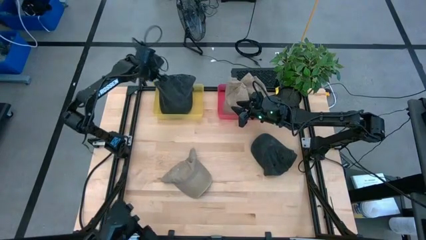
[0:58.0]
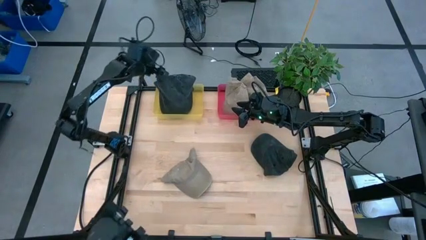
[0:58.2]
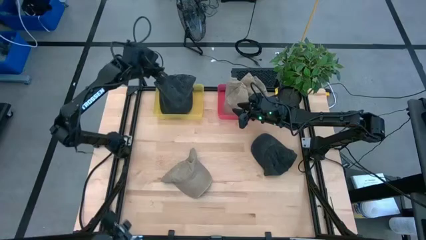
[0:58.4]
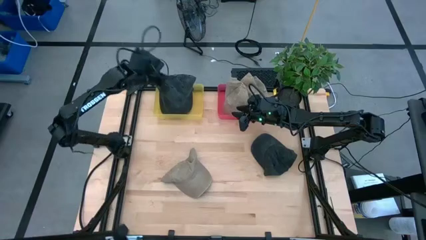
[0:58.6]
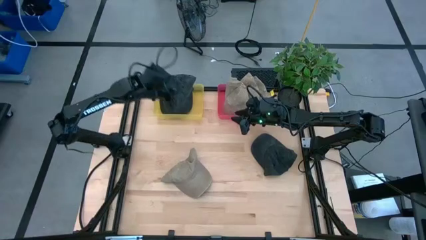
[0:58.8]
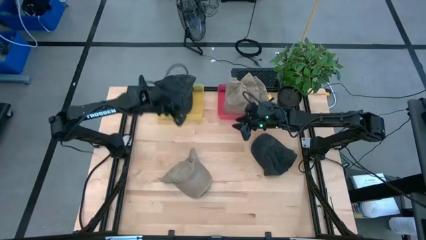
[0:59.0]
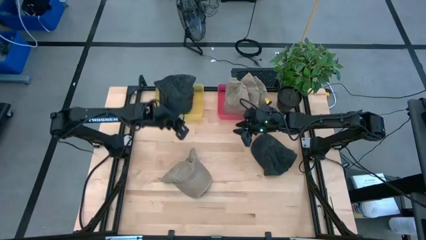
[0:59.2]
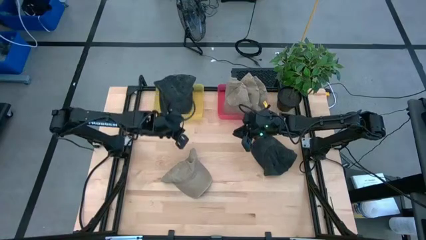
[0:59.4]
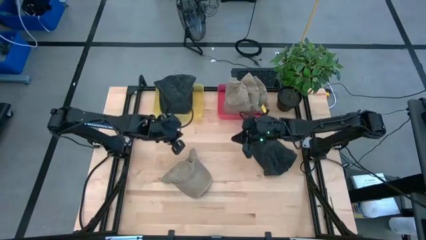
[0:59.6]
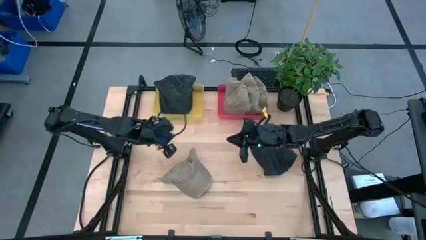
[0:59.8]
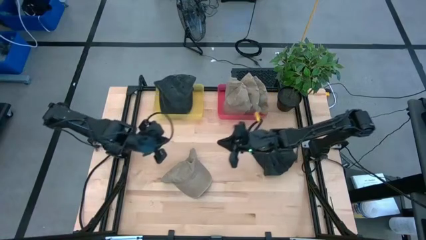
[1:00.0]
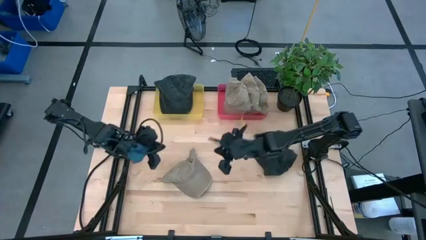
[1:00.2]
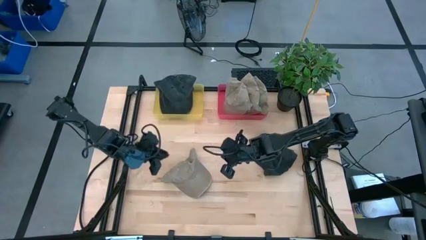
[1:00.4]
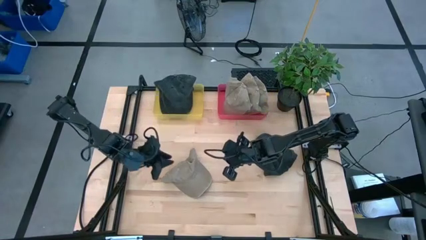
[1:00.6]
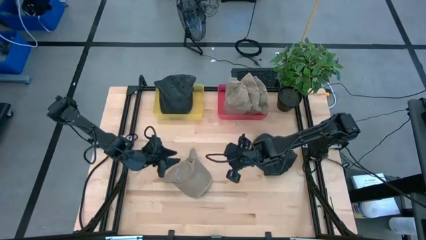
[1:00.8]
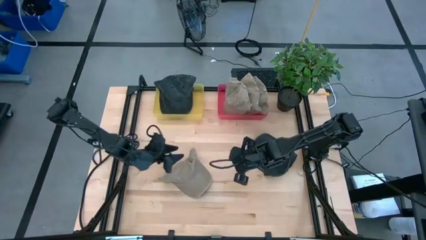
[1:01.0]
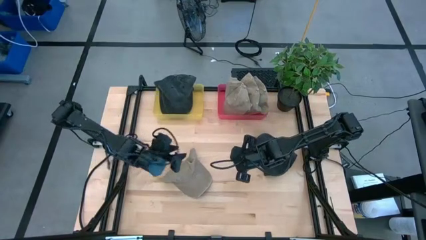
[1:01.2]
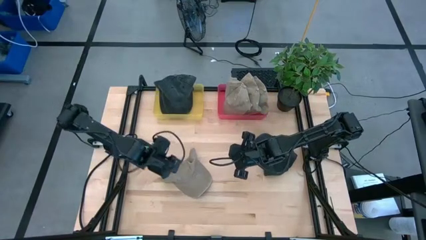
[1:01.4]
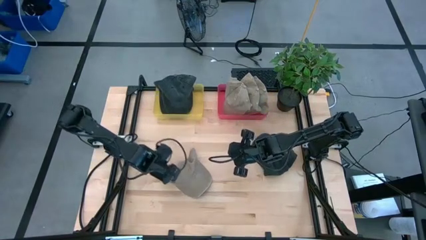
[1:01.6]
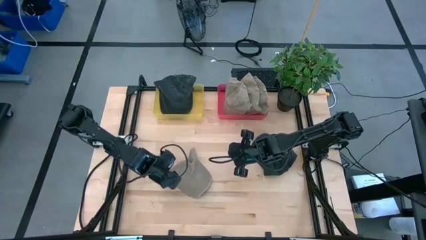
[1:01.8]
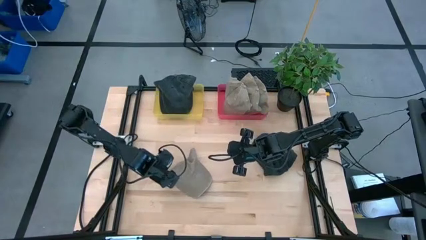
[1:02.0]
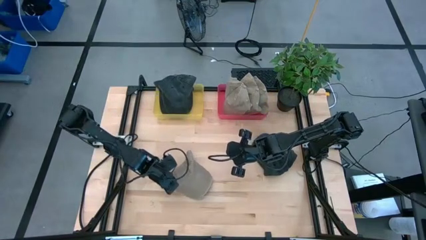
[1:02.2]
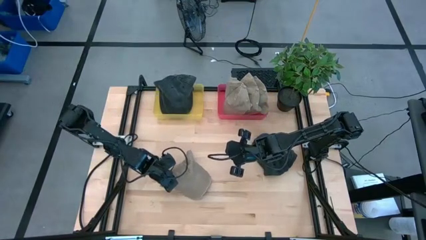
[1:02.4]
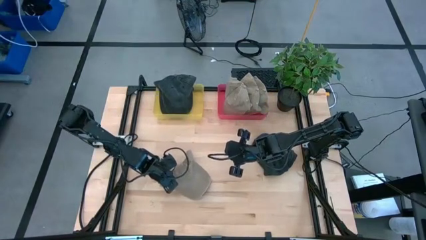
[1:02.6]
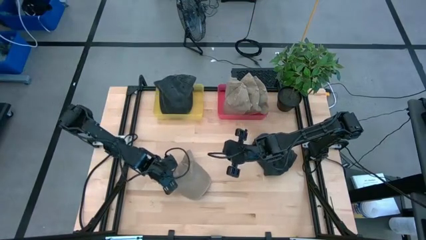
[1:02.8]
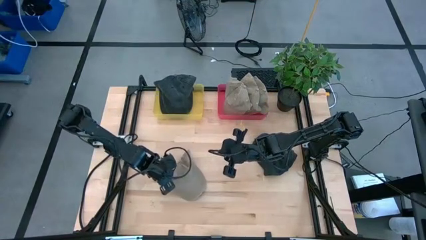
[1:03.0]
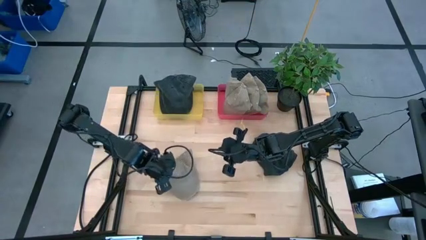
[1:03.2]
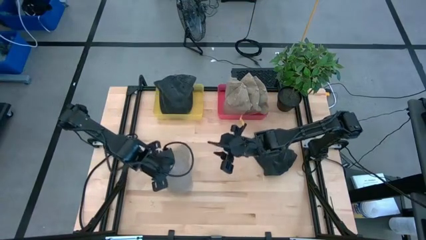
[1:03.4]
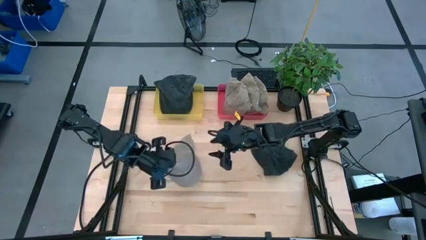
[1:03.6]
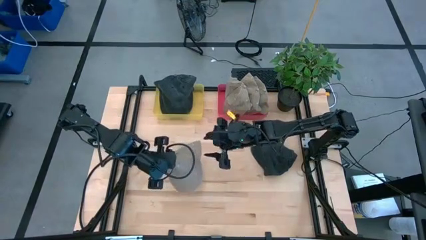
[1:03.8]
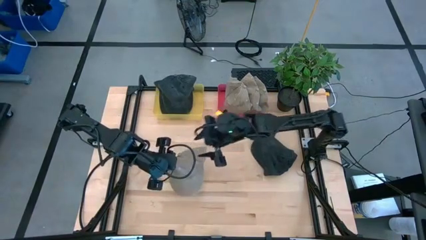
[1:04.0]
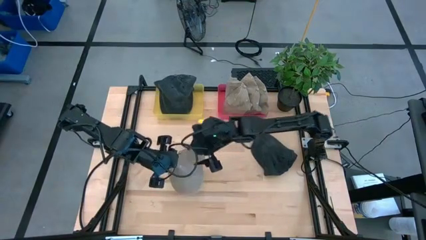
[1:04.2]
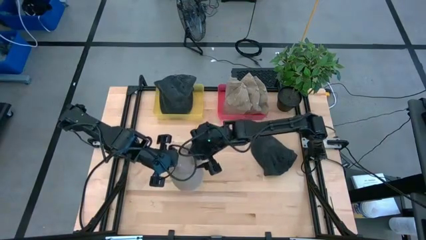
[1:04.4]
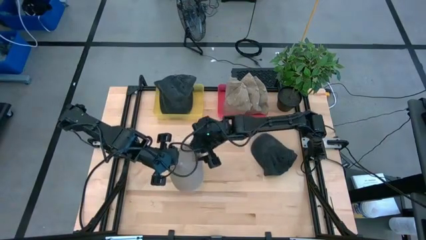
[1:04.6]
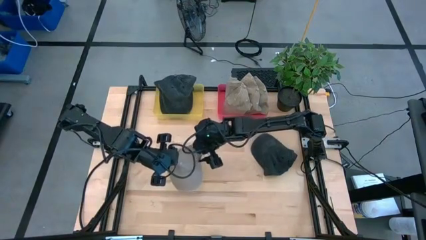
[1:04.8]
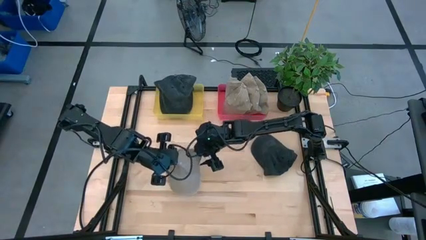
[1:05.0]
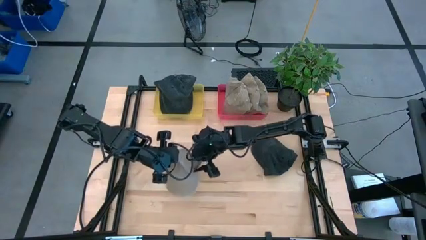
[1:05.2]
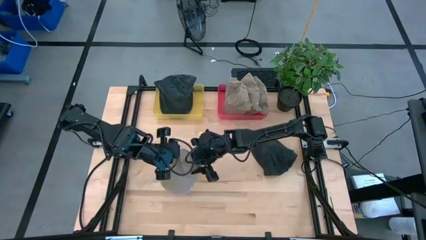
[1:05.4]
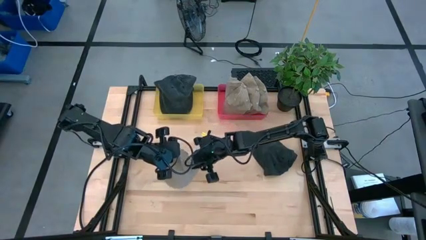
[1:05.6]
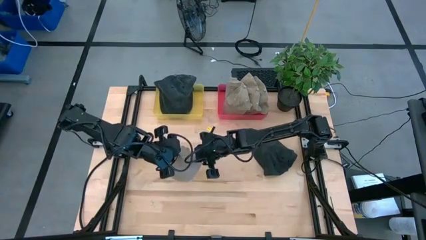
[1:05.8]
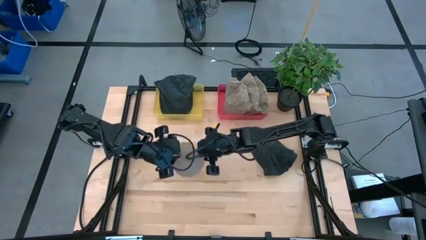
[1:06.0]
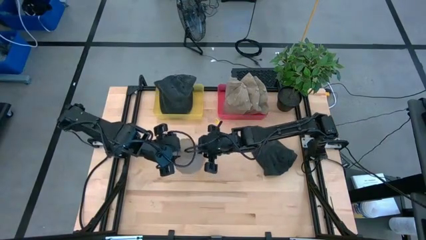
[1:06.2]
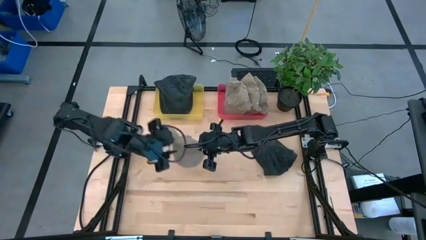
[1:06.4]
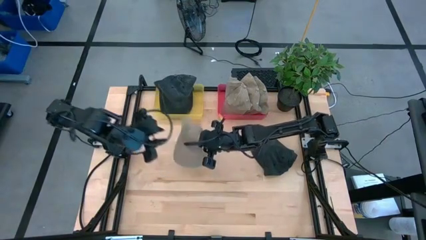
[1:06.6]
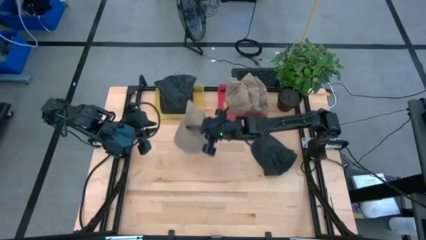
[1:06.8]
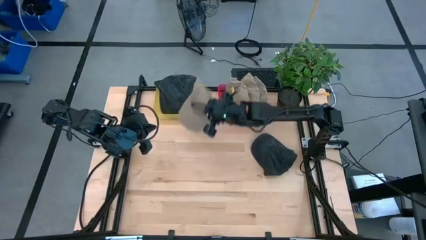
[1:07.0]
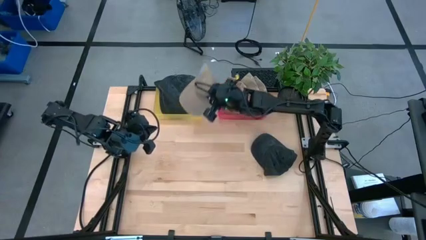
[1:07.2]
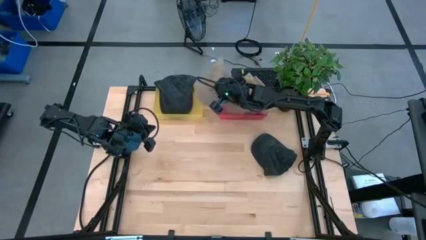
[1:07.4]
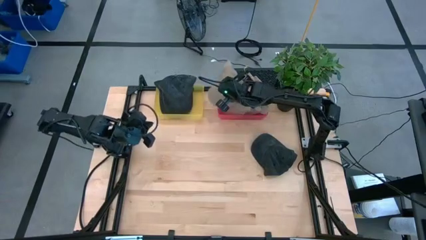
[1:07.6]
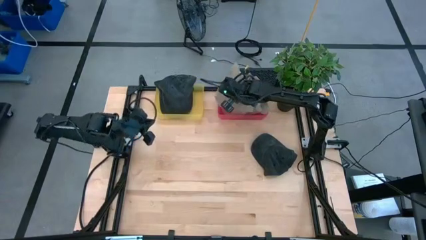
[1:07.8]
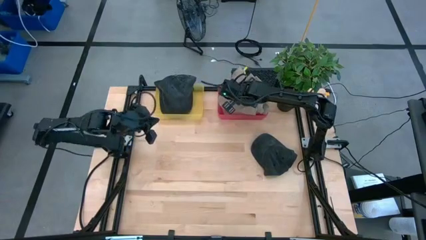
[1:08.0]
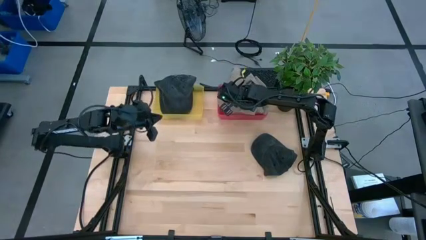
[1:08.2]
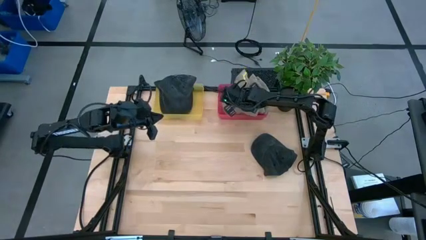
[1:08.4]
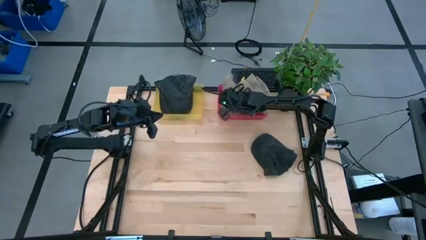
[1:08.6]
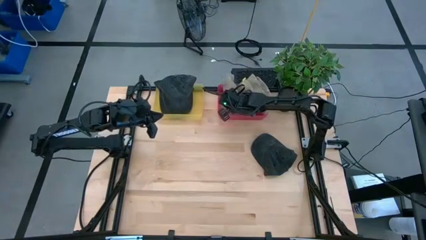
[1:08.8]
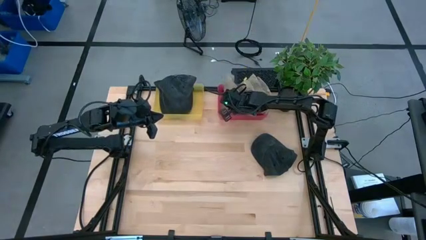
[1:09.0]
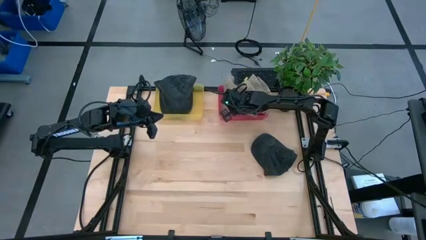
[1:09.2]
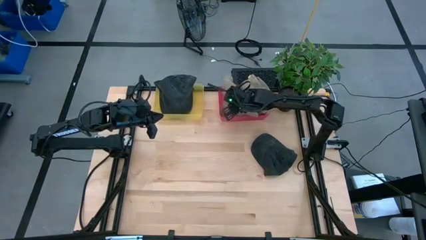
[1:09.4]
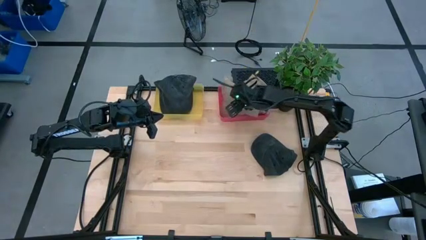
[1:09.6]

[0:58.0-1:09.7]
Task: Pick & Place hat
Put the brown cap into the red bin

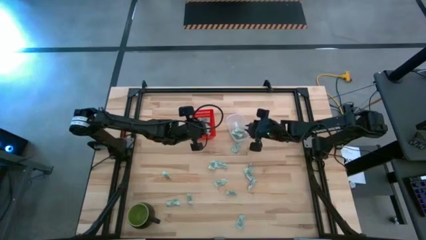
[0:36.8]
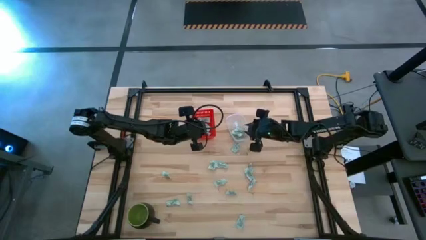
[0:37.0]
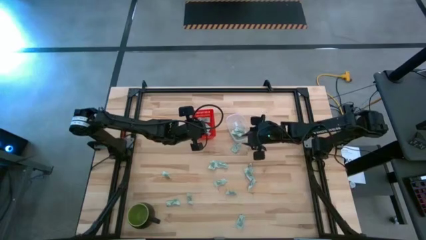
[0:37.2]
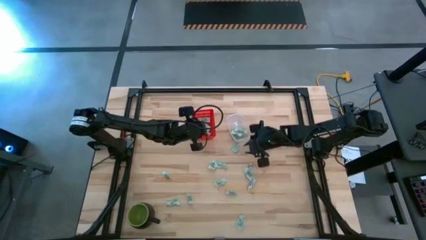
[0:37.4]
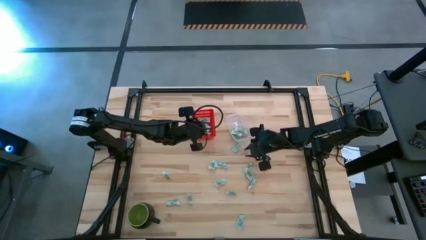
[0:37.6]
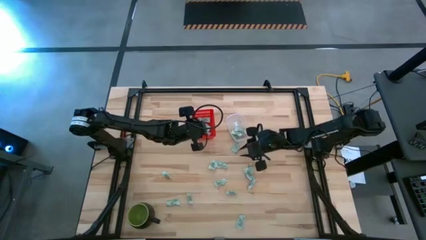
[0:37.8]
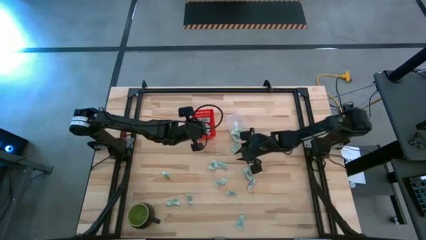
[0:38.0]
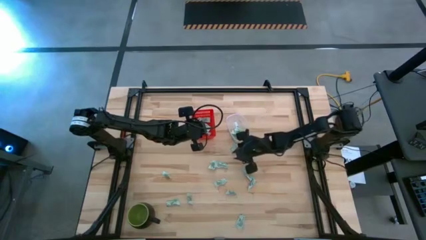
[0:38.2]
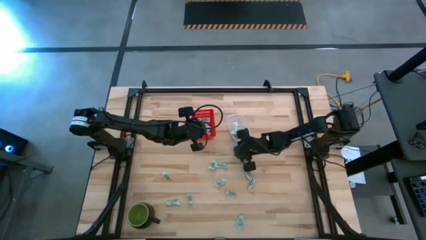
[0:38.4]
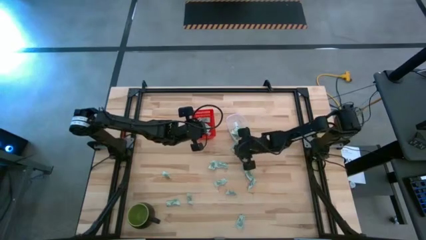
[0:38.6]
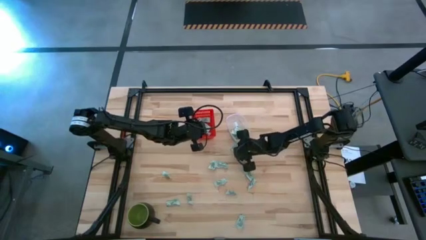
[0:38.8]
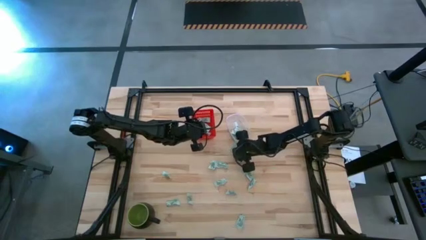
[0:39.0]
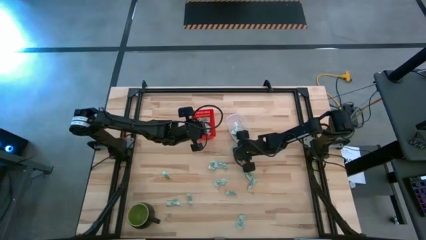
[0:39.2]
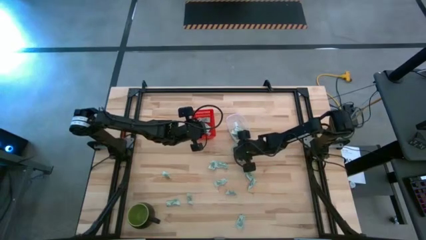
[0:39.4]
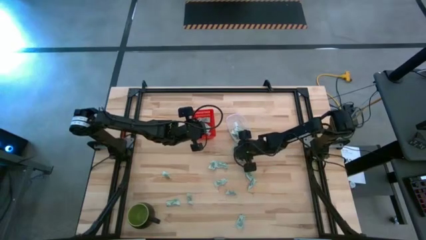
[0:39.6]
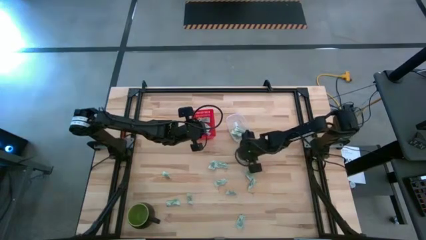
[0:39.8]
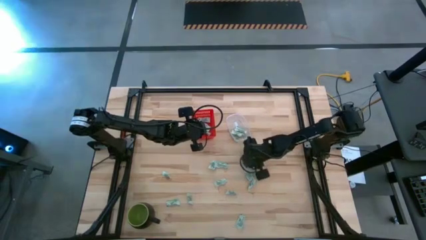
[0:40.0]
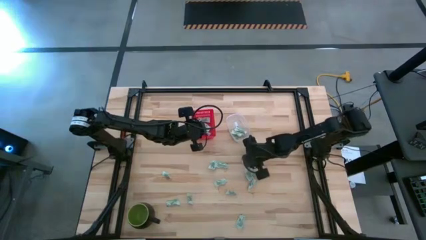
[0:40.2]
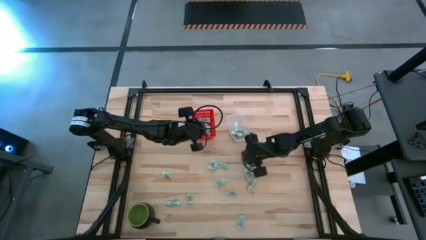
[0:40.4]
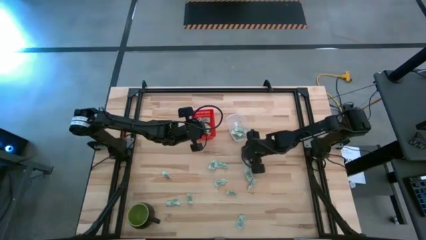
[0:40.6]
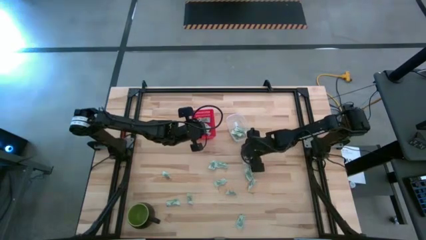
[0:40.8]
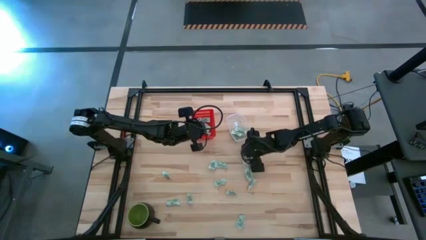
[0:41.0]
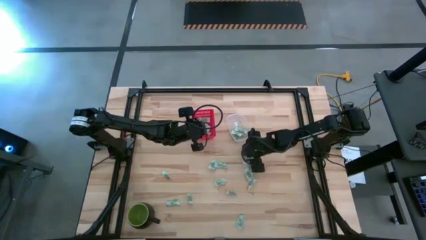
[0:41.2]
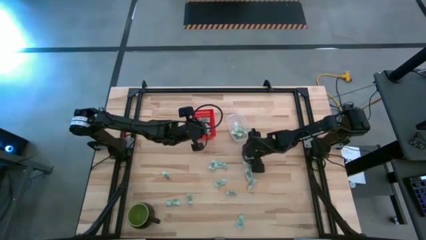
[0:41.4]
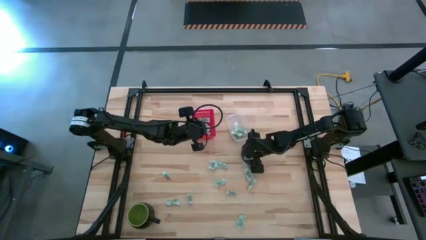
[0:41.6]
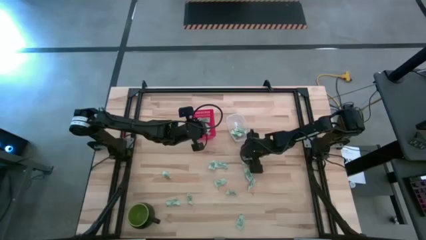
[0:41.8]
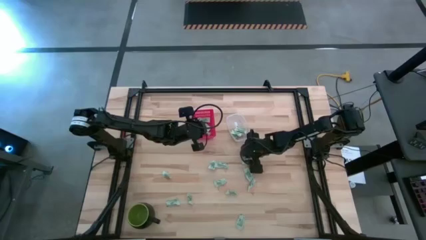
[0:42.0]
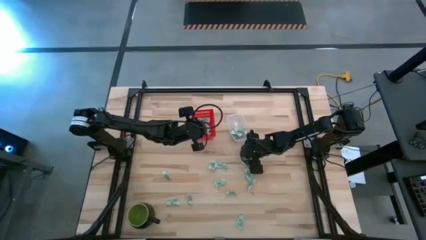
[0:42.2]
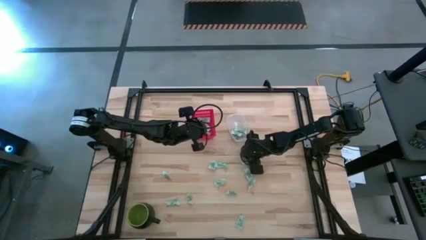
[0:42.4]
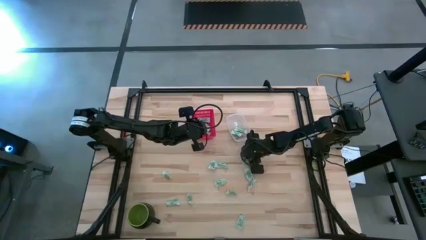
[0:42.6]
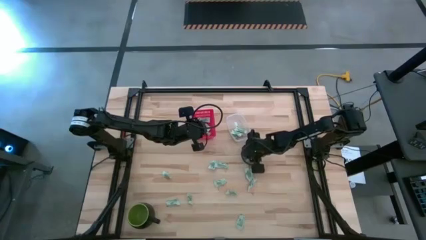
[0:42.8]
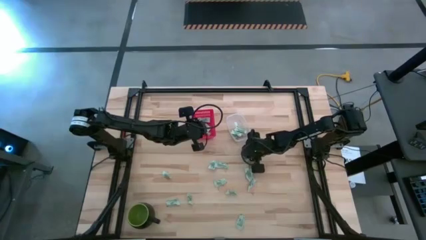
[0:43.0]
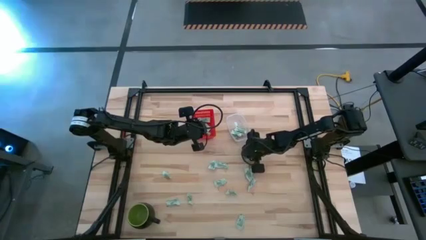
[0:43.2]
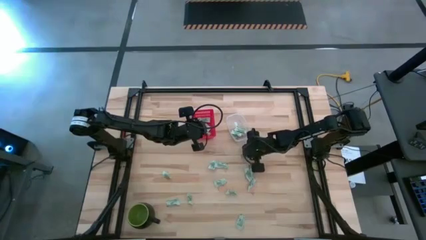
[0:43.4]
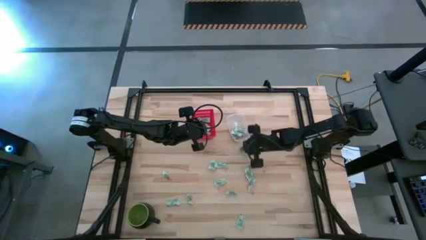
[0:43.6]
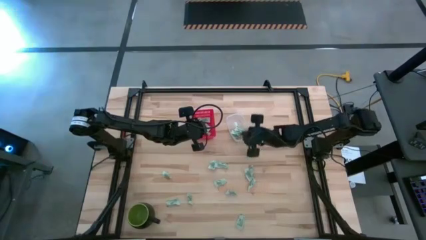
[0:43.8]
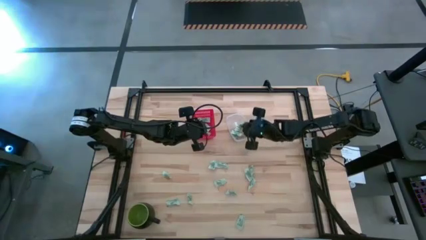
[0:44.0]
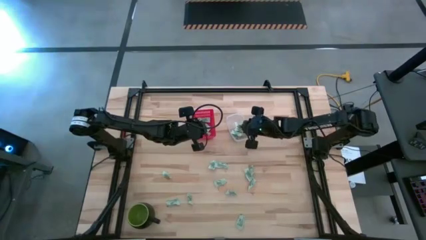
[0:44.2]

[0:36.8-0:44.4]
Task: Pick and place items into bin
Put the white stevia packet into the transparent bin
